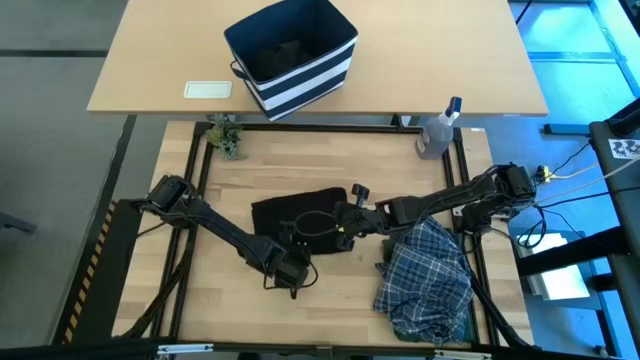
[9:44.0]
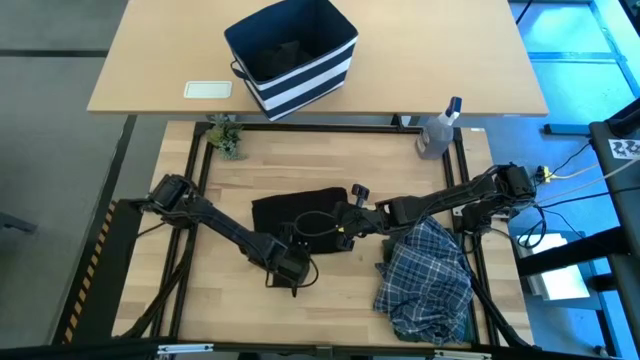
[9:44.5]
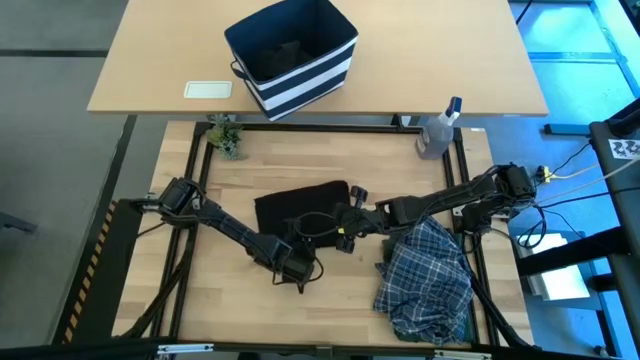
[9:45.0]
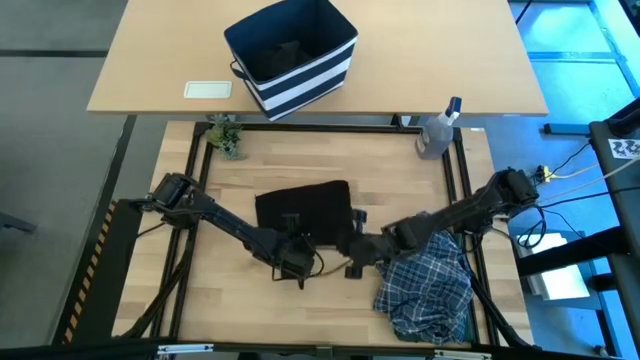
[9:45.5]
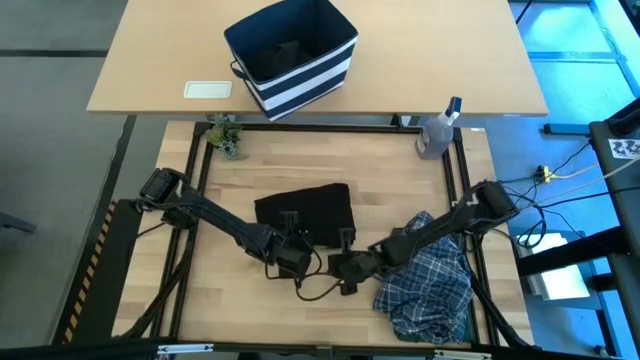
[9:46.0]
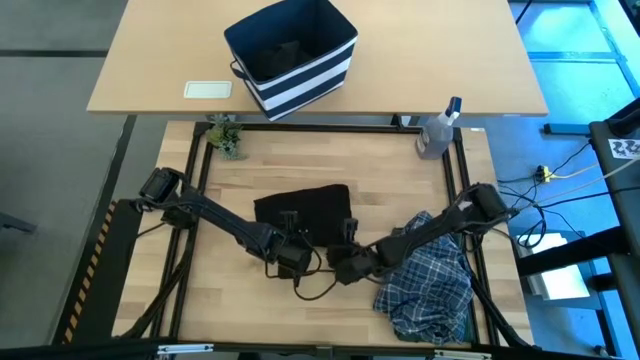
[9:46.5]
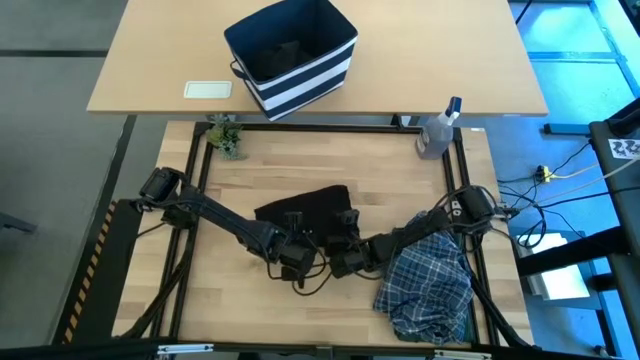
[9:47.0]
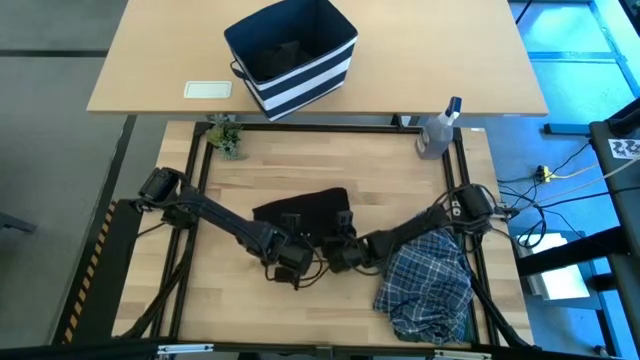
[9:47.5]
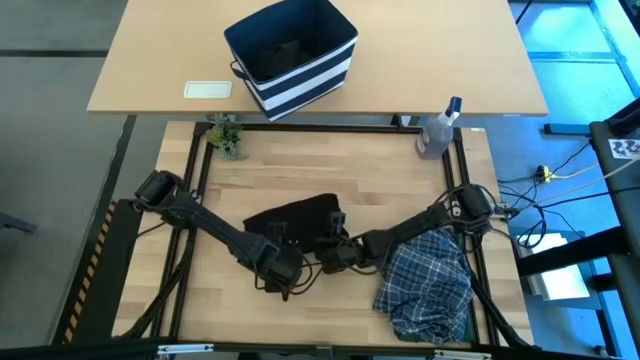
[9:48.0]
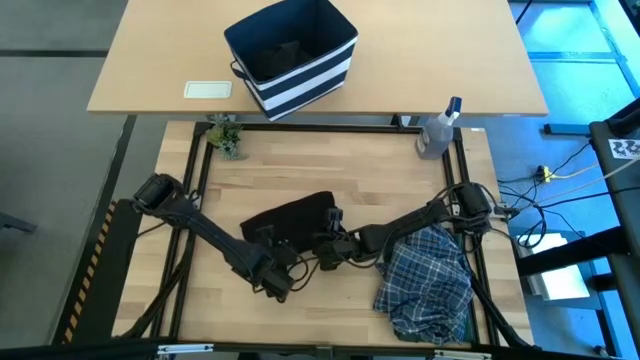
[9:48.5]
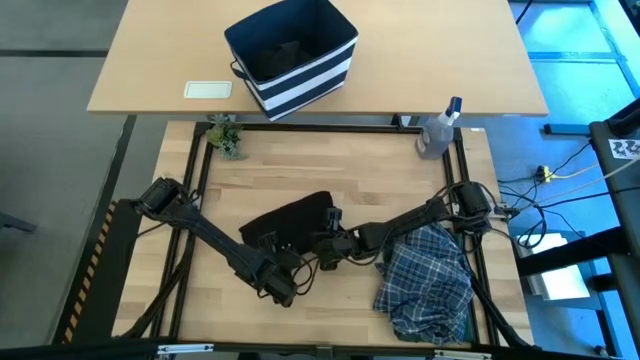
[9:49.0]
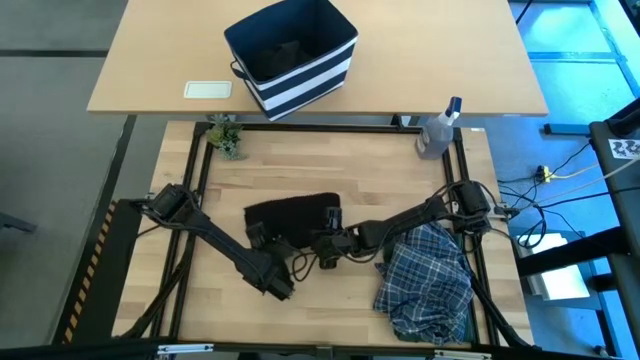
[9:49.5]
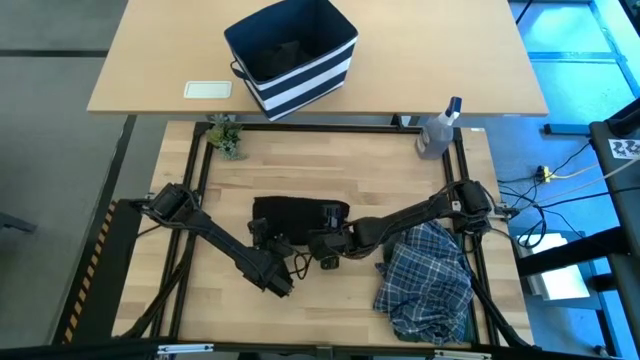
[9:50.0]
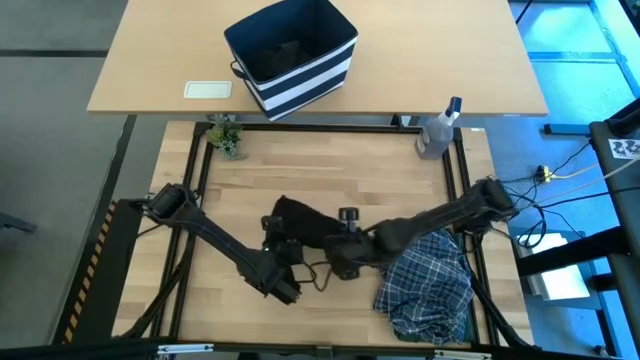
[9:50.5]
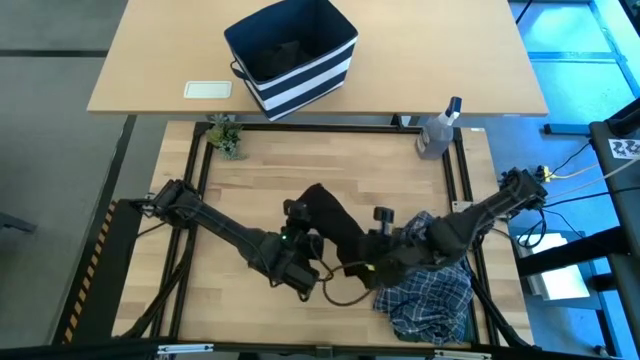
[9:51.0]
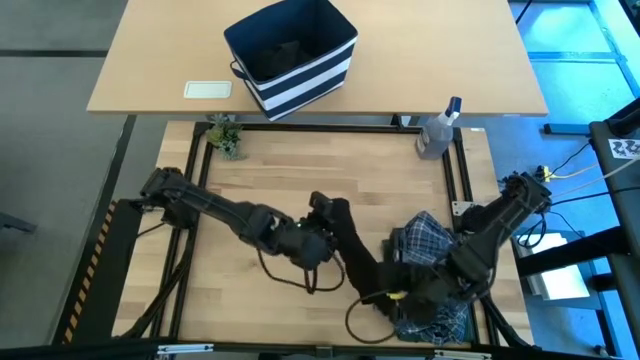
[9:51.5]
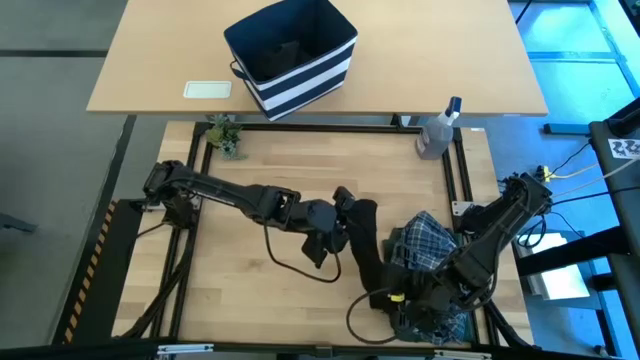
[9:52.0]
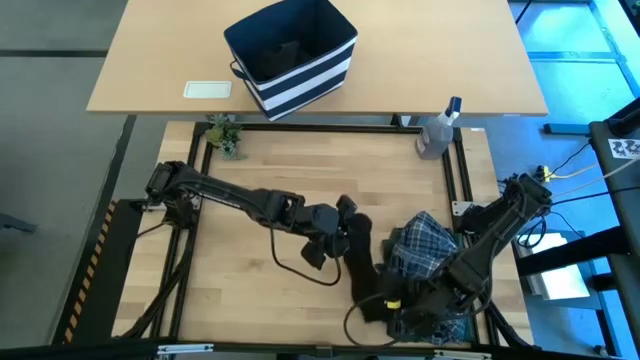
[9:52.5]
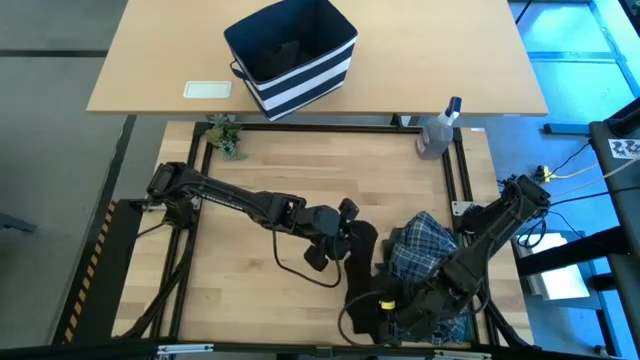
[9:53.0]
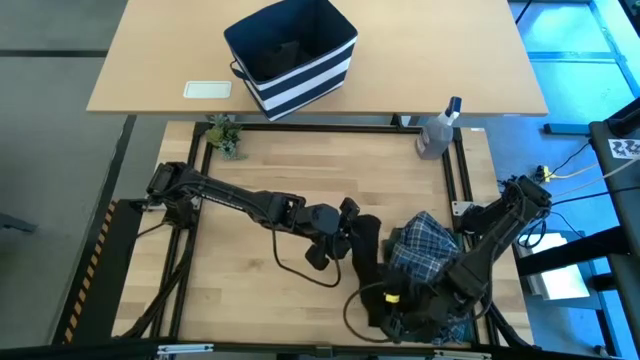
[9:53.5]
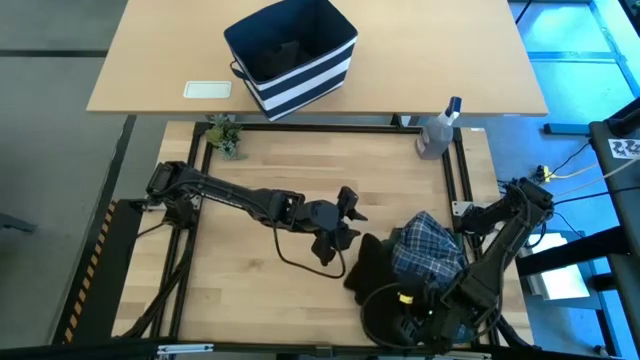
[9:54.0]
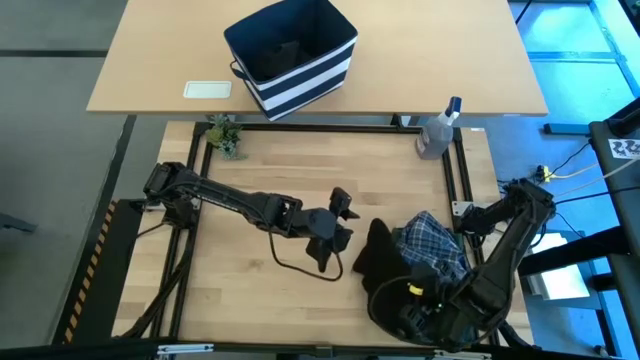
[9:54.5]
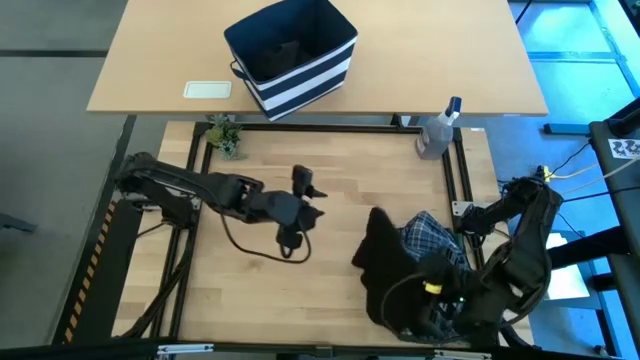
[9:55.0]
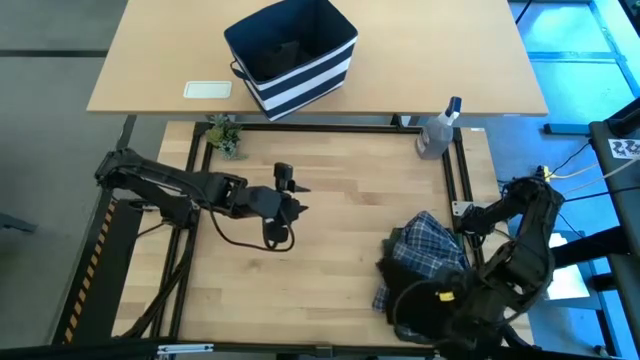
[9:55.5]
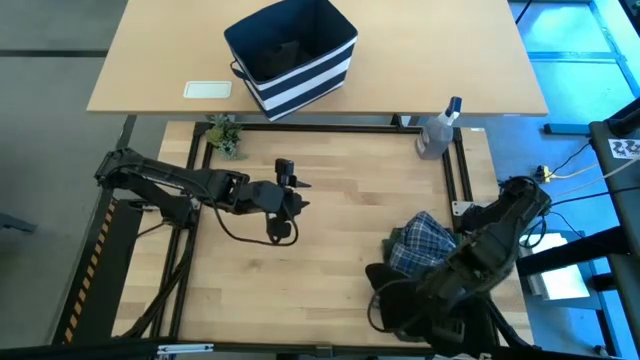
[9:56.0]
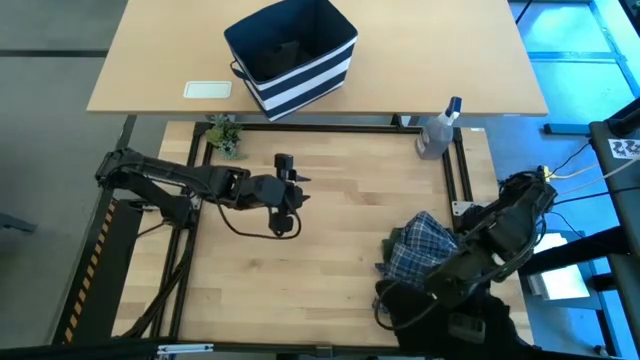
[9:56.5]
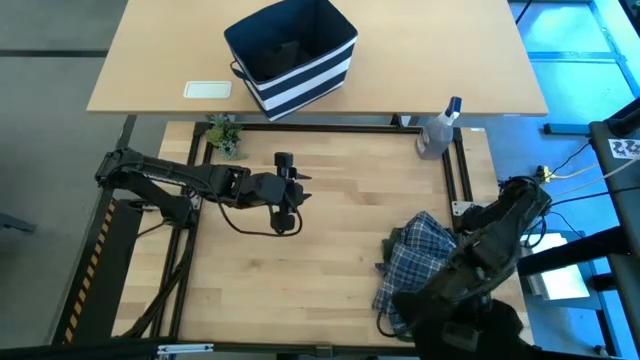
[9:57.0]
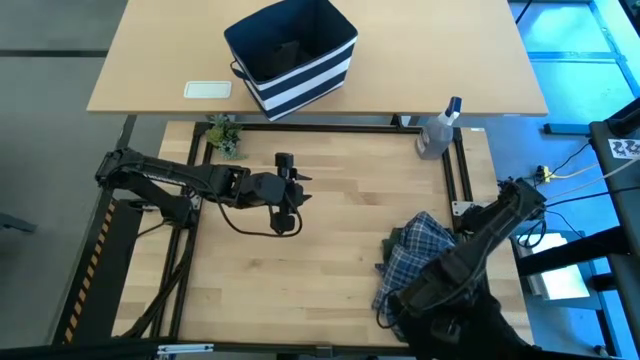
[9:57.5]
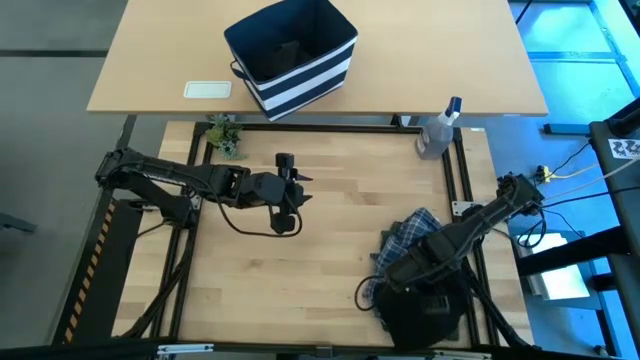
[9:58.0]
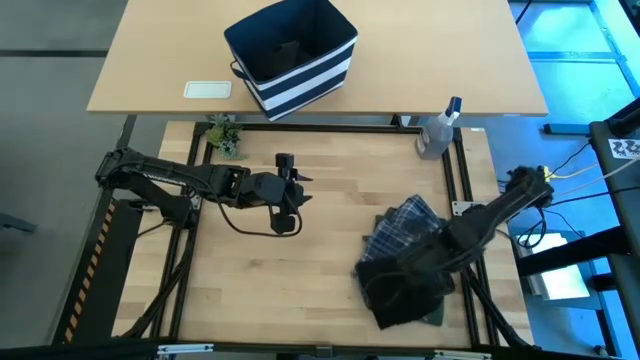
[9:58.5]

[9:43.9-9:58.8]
Task: Fold Laundry from Bin
Stack the folded black shirt on top of the folded blue checkered pants

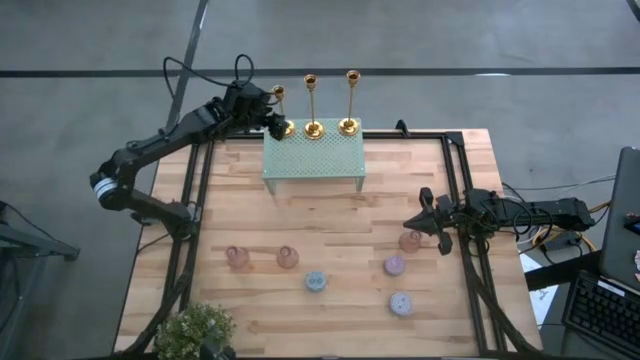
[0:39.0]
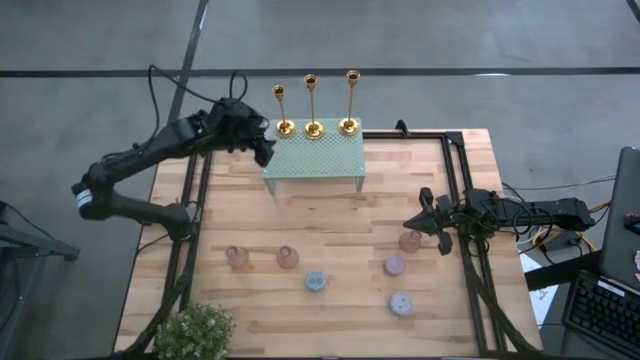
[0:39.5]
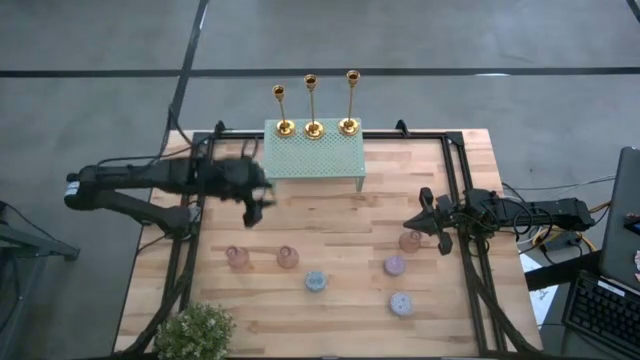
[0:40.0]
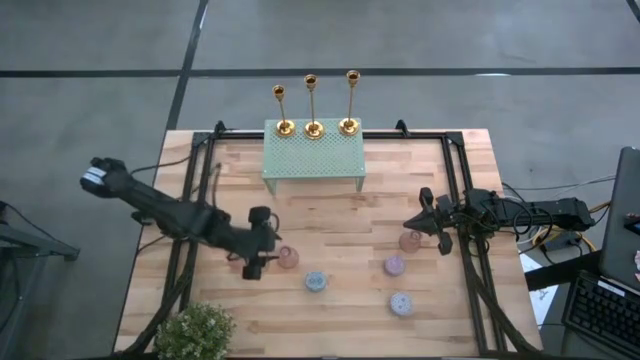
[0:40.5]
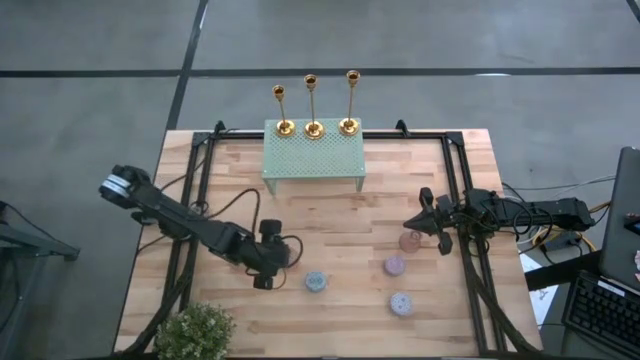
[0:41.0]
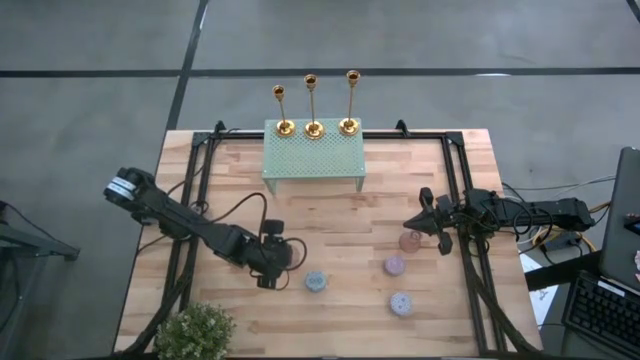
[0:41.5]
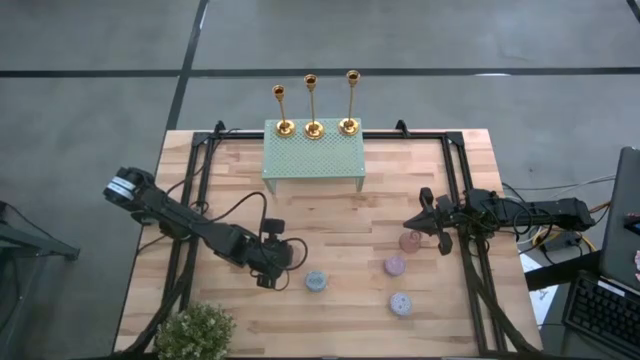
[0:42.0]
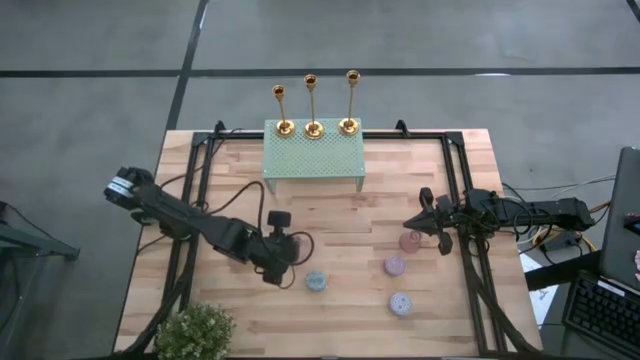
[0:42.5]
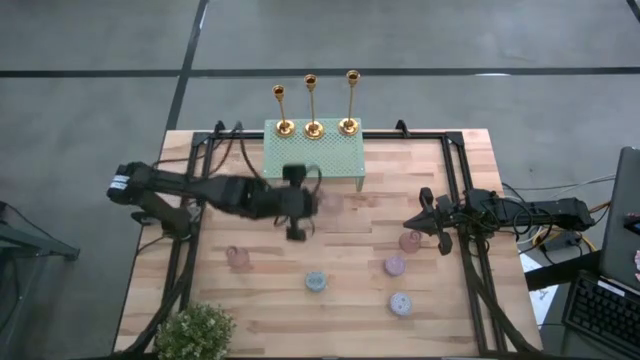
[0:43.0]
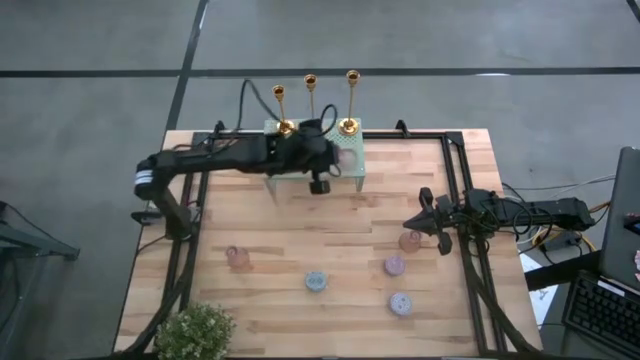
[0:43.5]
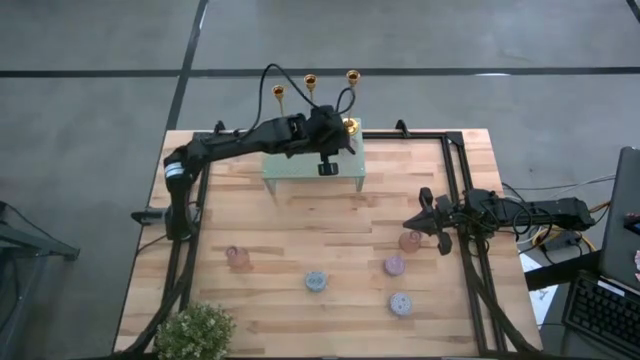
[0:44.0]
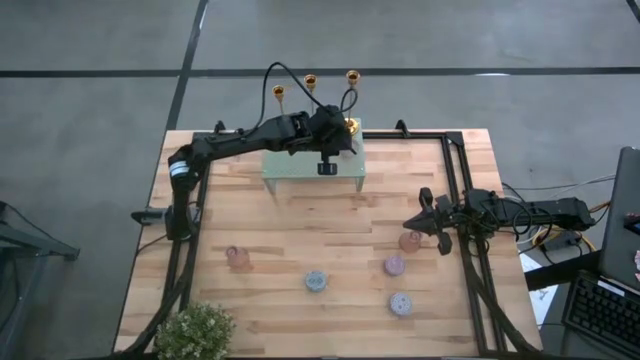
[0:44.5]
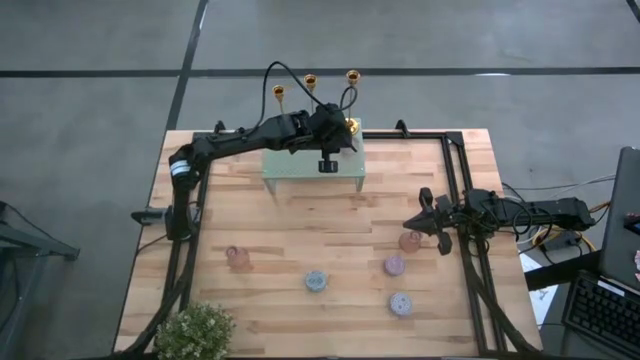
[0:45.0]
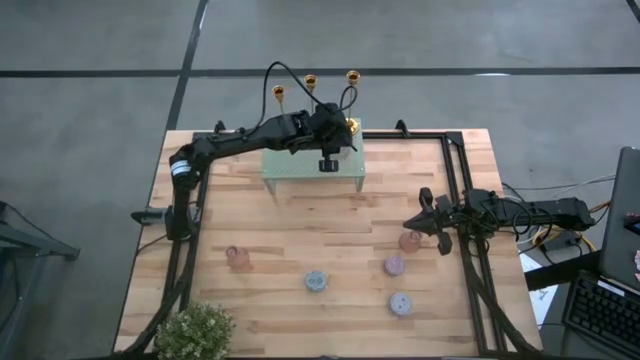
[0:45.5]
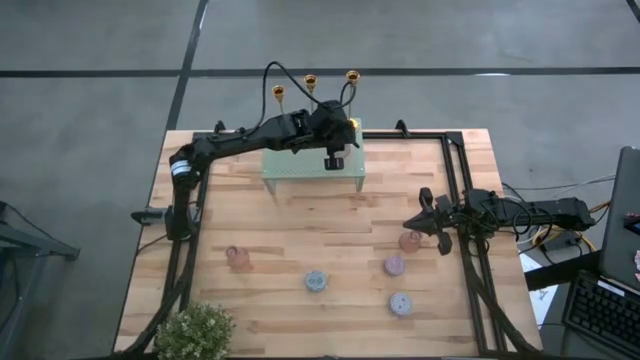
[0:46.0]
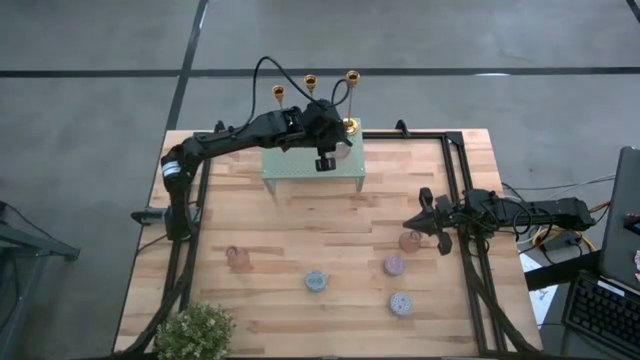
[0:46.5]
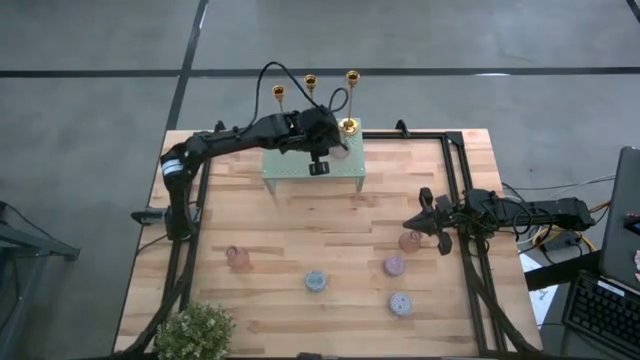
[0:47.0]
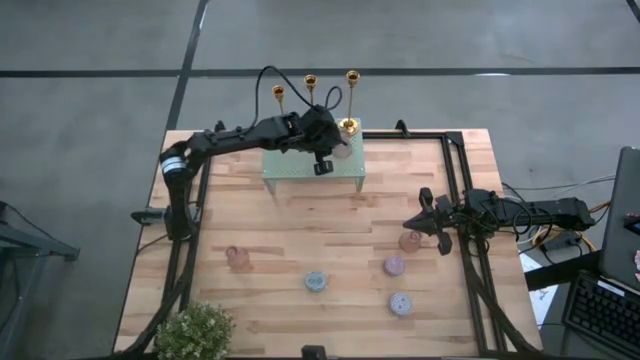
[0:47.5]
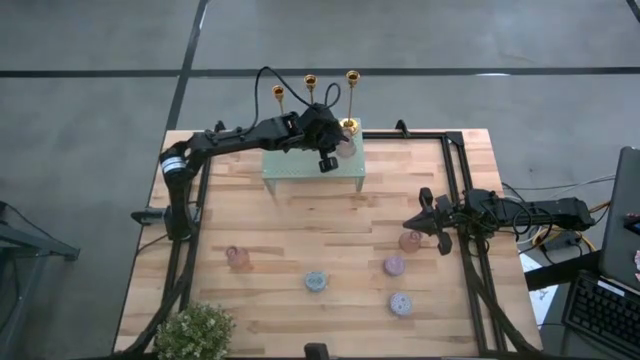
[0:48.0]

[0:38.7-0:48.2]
Task: Pick & Place candle stick holders
Put the middle pink candle holder on the shelf
